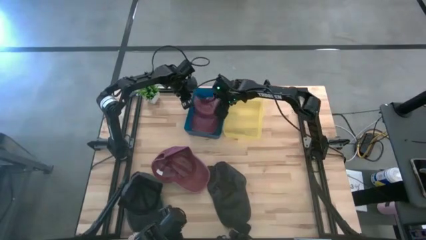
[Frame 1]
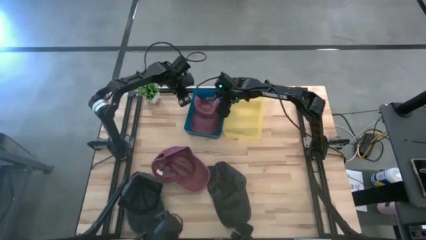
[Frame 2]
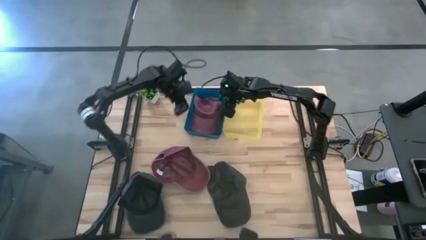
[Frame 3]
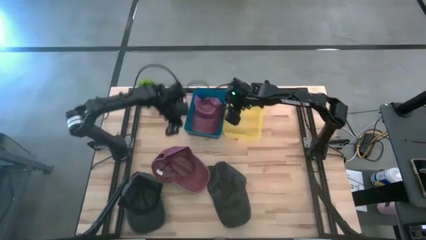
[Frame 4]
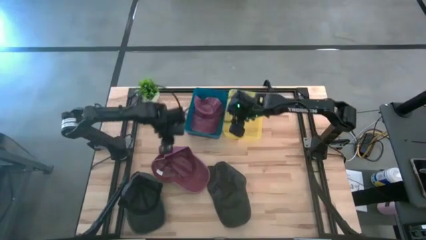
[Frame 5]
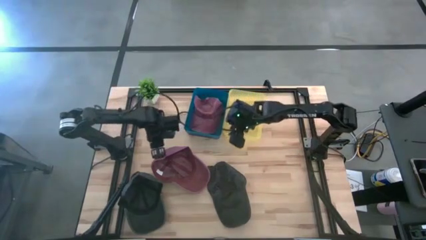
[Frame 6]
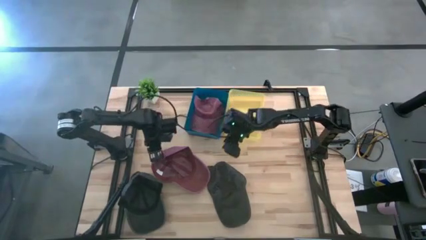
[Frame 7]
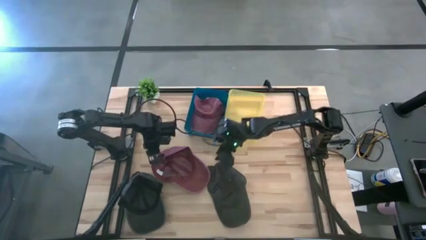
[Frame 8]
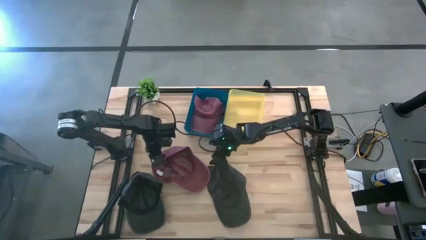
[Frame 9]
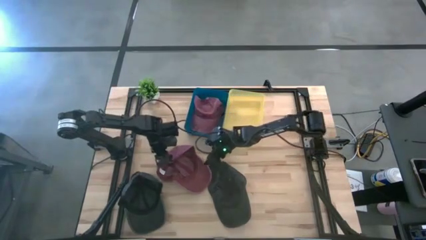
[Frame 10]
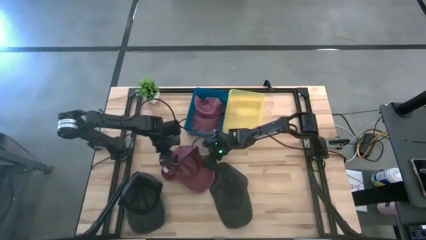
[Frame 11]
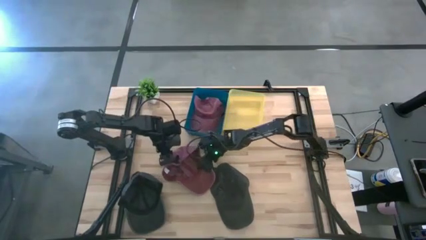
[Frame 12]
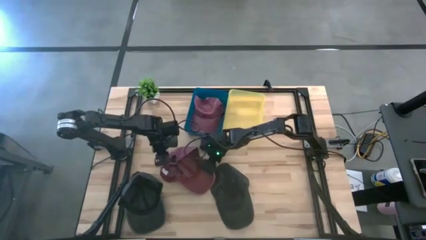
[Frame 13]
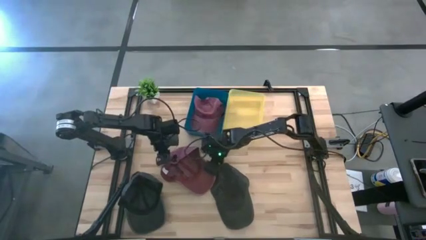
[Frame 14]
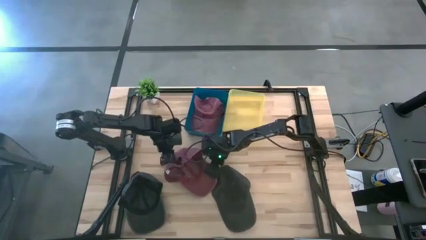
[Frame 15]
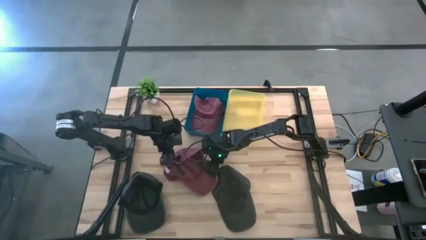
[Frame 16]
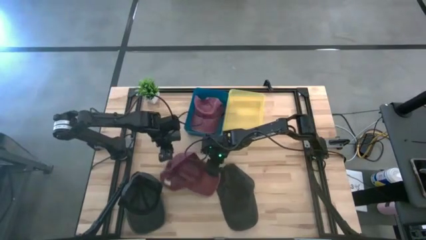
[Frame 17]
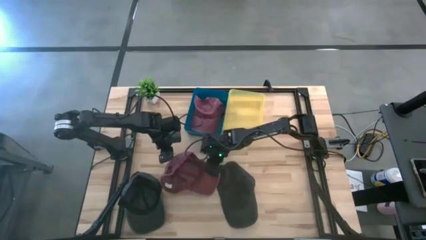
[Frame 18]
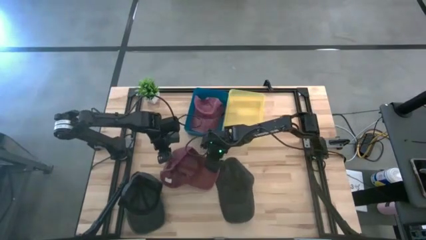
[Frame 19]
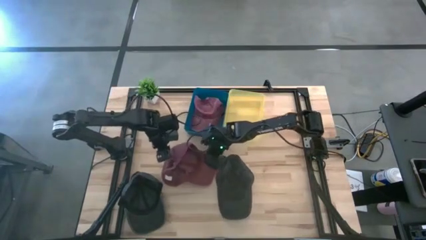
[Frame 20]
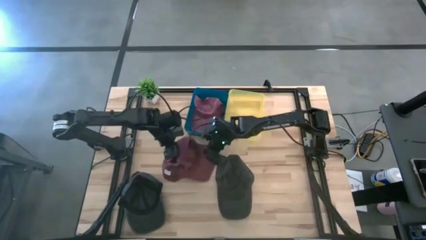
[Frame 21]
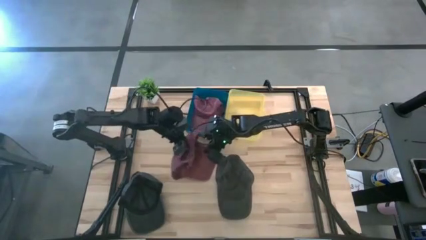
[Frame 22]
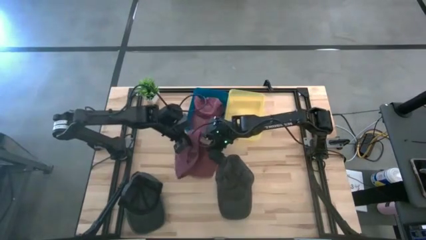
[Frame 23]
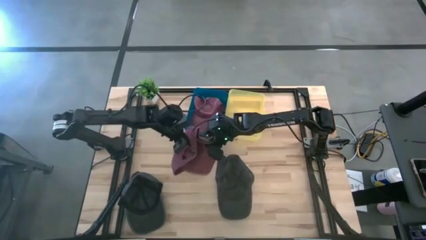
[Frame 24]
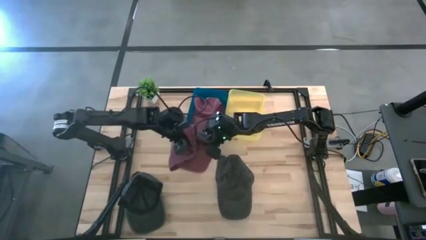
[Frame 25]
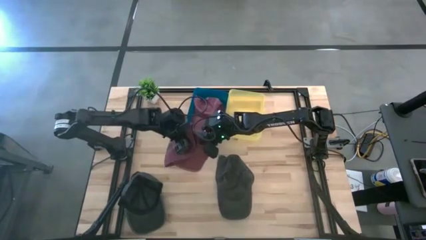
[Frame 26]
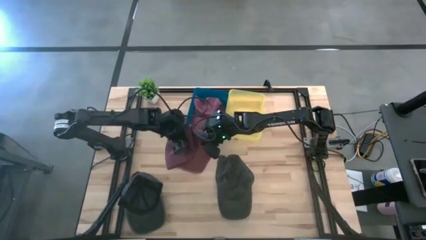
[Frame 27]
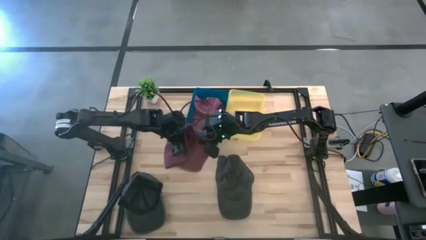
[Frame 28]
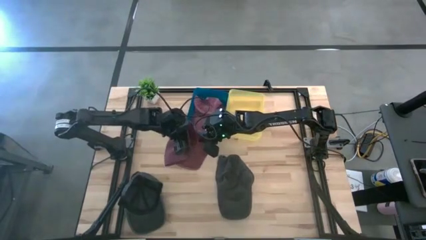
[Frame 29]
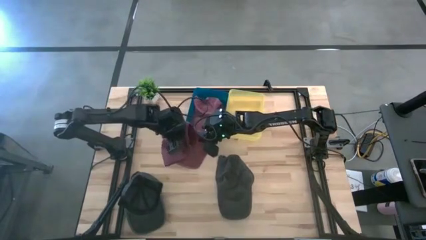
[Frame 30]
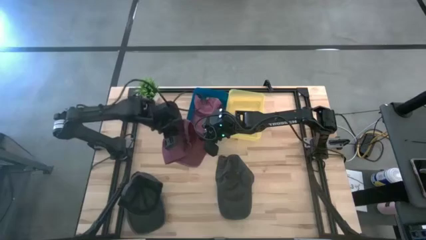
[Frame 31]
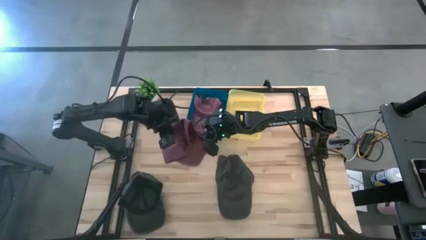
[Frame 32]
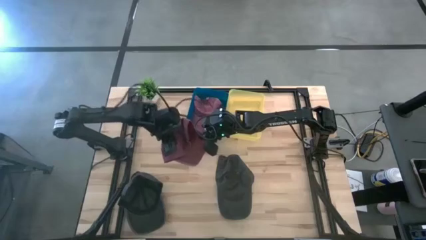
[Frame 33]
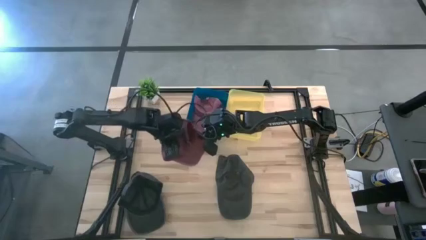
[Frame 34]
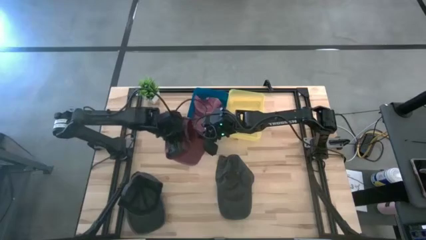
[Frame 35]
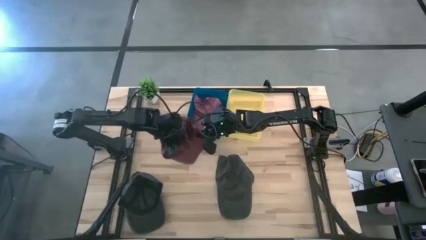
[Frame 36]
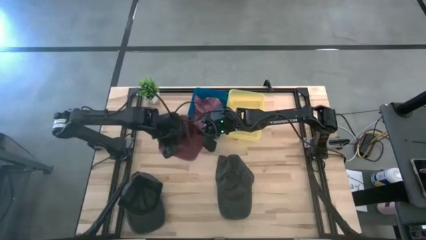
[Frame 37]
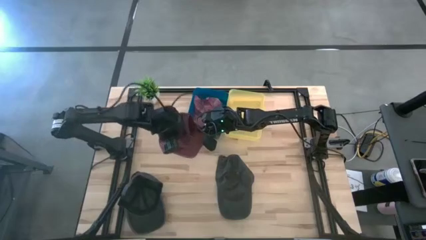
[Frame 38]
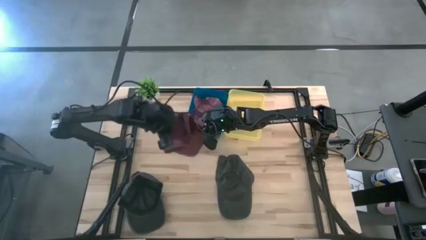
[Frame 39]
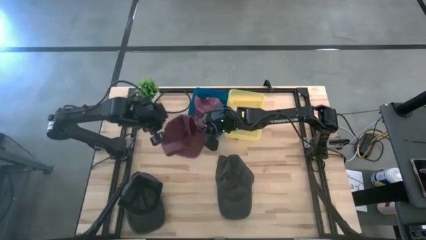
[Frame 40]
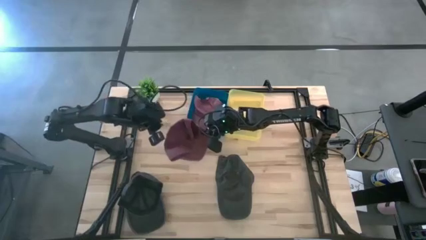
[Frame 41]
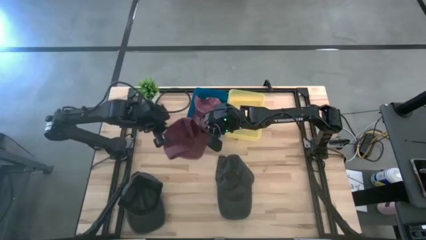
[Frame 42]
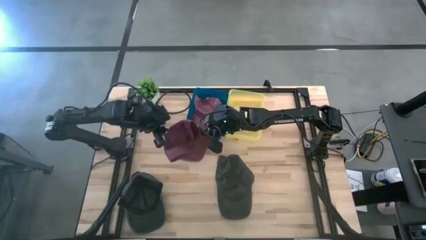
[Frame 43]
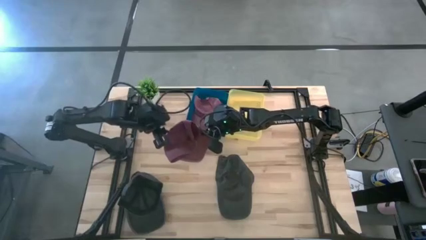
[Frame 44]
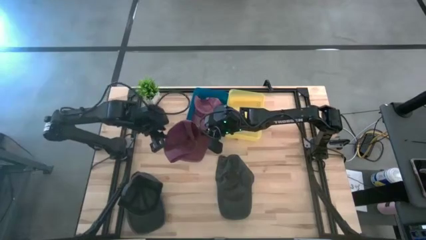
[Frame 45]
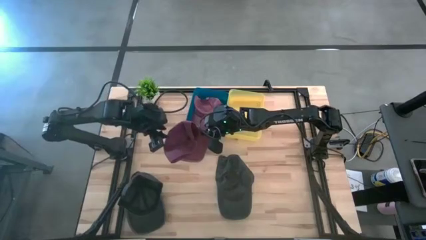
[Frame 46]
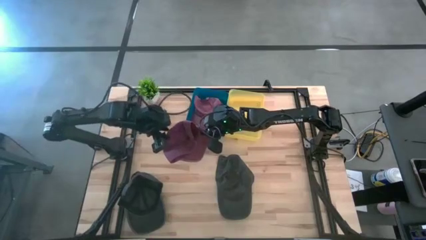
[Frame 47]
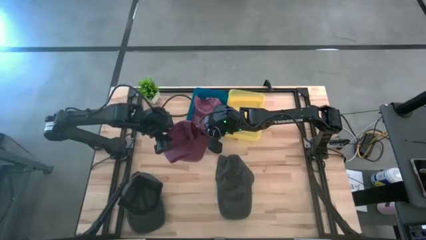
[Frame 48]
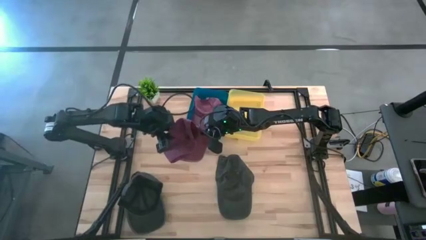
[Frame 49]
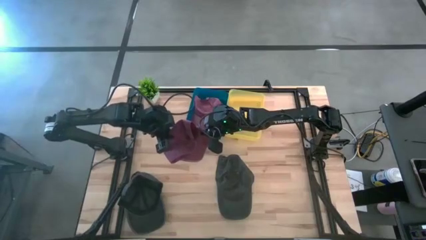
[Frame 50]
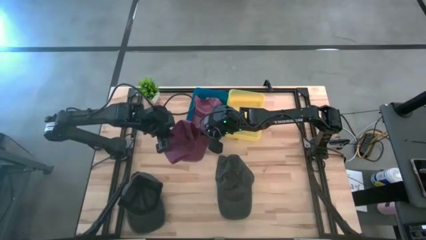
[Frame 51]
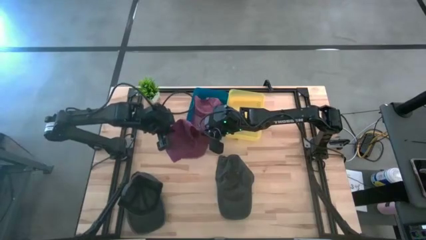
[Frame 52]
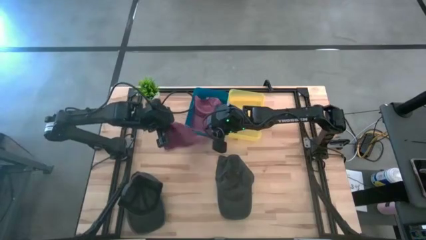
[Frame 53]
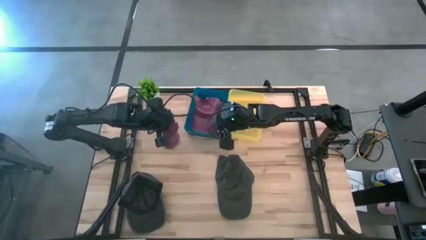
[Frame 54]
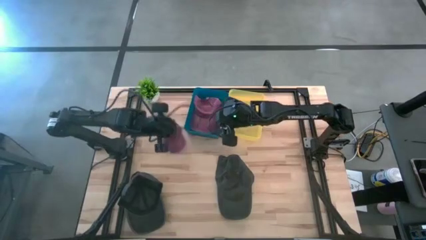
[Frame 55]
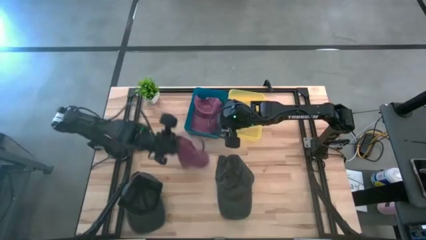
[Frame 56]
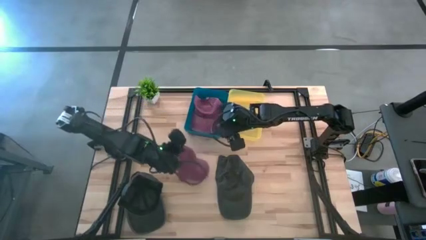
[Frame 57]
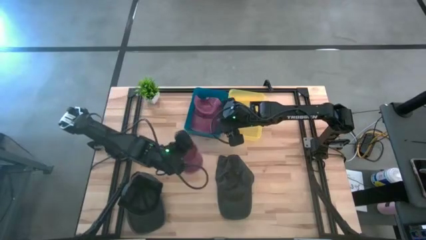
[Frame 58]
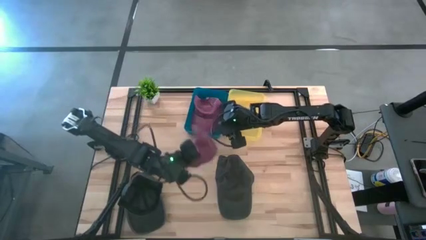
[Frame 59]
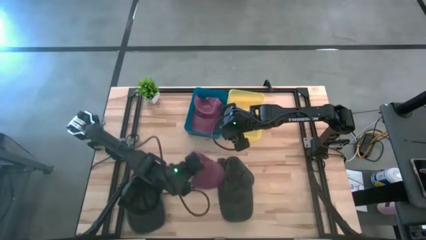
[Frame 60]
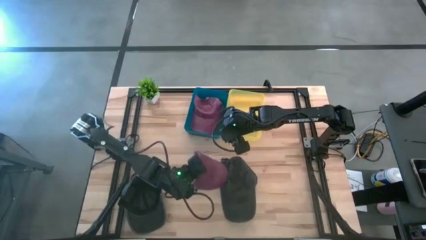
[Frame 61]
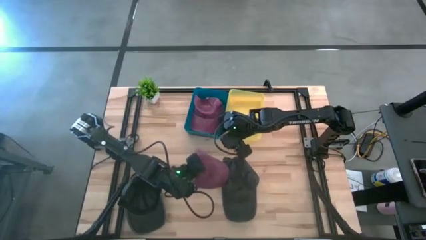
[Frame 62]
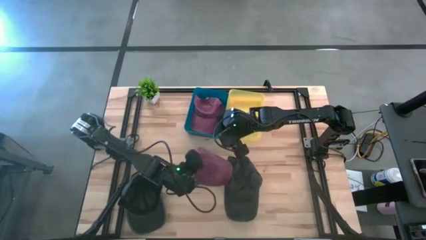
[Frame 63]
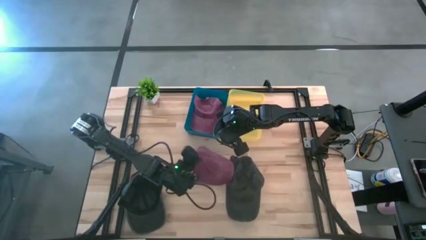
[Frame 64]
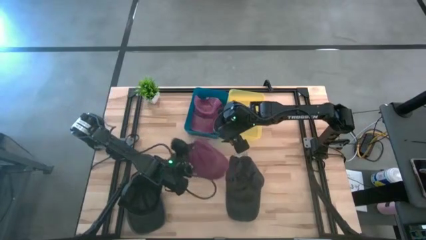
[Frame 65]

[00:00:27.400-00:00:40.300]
Task: Pick & Place hat
Put the red cap into the blue bin
